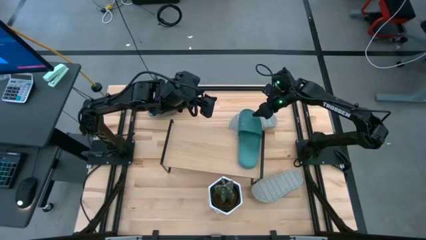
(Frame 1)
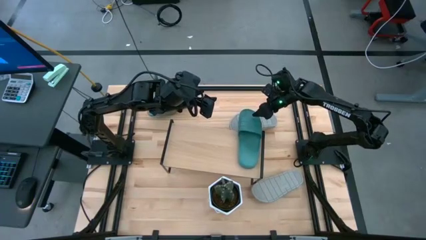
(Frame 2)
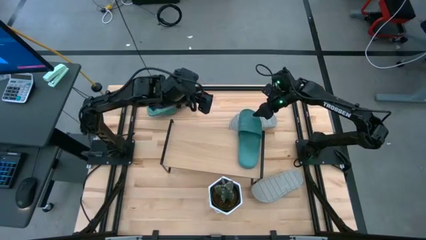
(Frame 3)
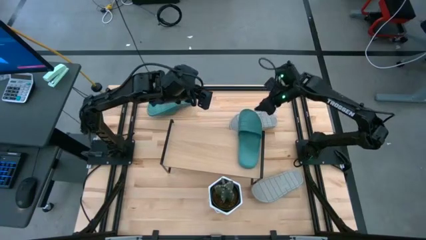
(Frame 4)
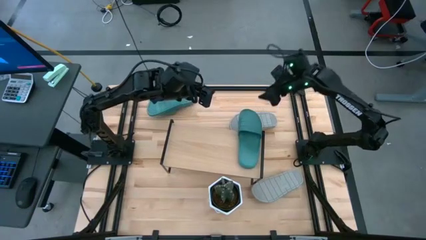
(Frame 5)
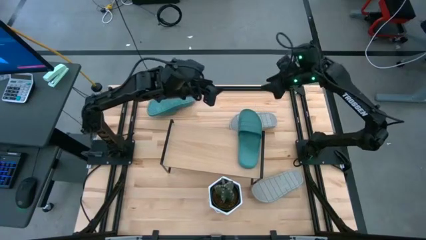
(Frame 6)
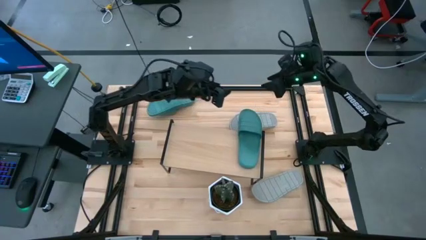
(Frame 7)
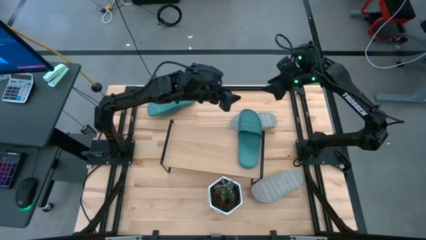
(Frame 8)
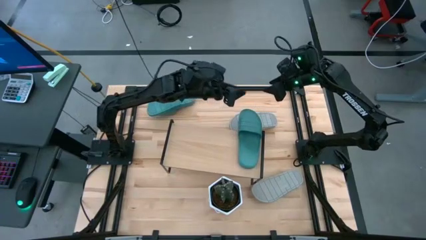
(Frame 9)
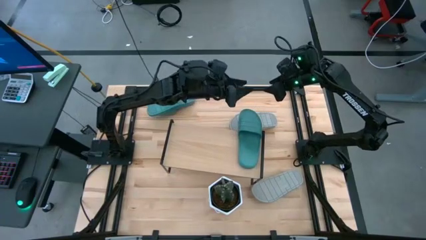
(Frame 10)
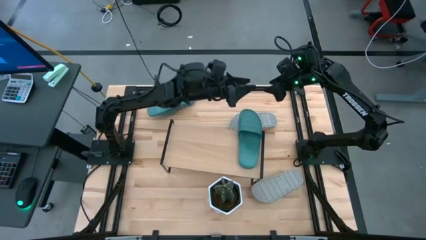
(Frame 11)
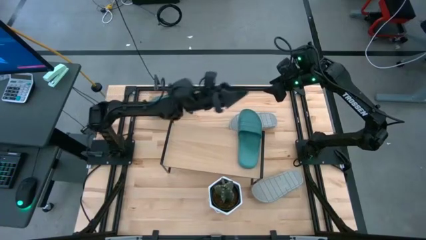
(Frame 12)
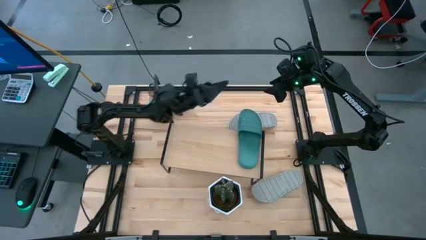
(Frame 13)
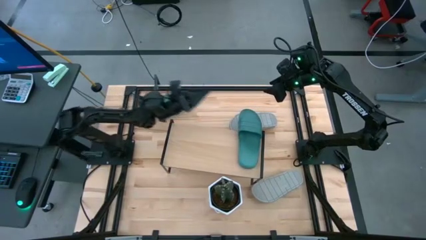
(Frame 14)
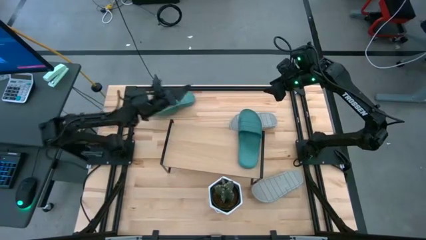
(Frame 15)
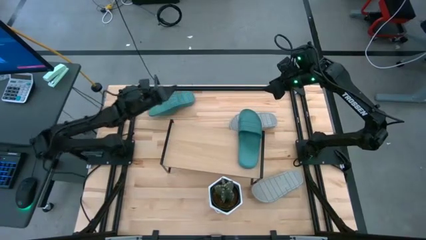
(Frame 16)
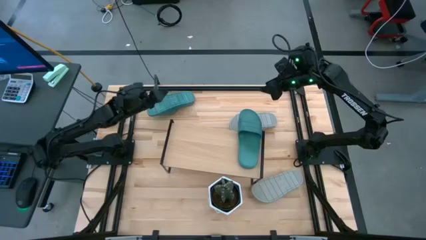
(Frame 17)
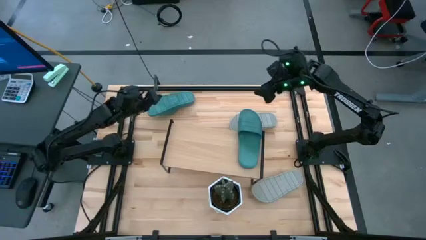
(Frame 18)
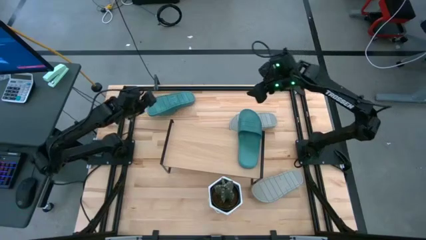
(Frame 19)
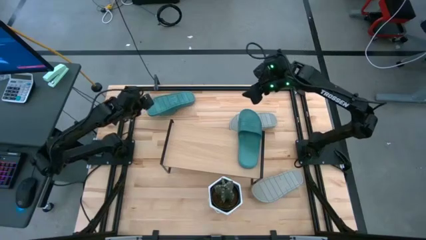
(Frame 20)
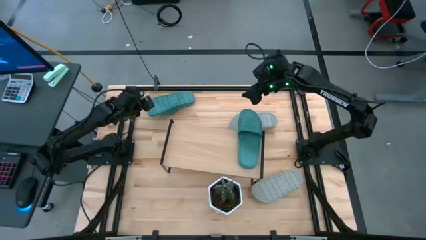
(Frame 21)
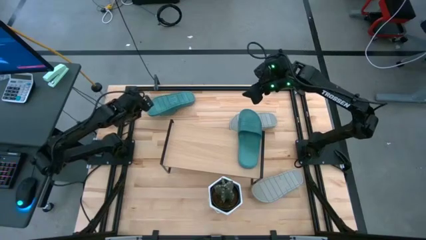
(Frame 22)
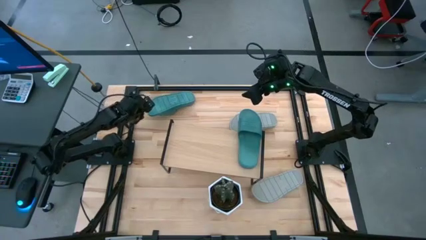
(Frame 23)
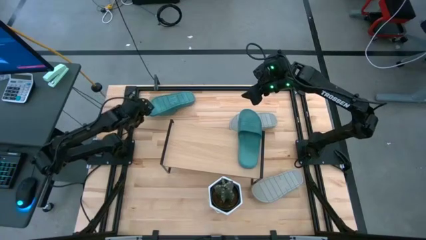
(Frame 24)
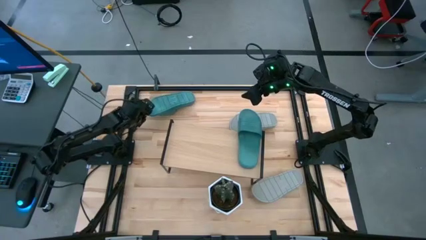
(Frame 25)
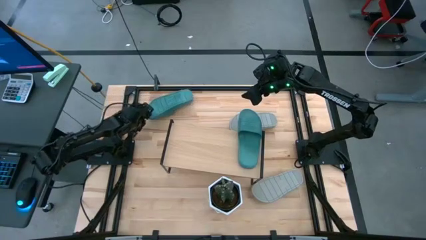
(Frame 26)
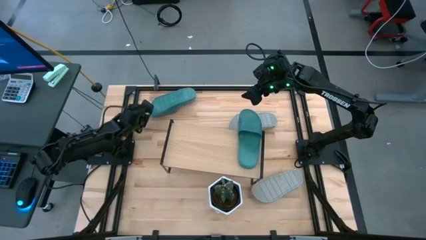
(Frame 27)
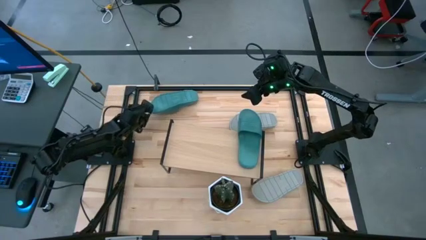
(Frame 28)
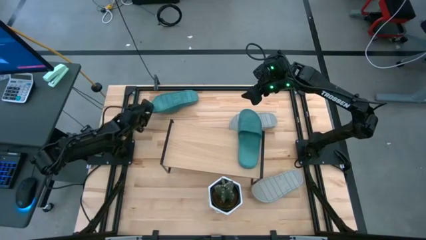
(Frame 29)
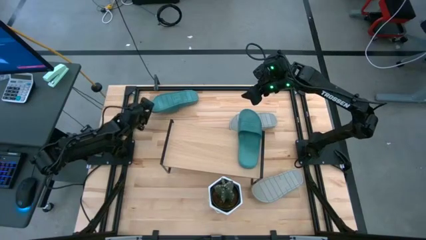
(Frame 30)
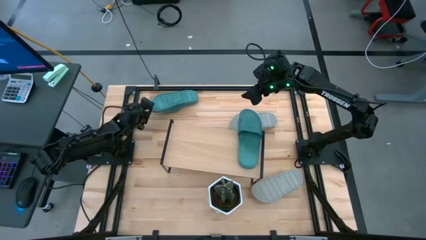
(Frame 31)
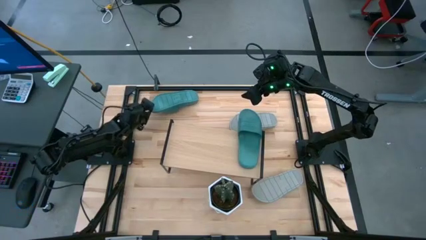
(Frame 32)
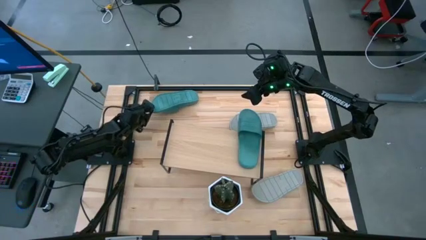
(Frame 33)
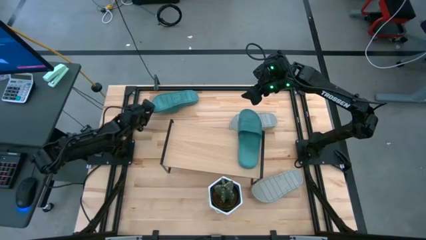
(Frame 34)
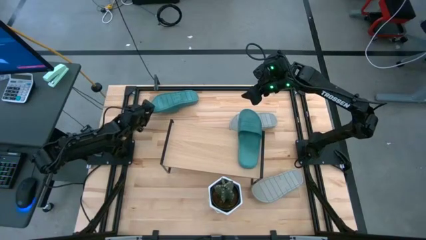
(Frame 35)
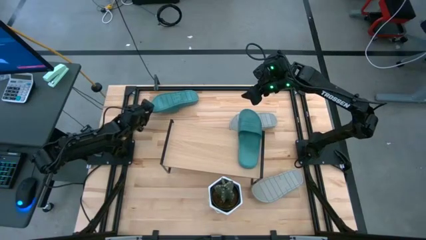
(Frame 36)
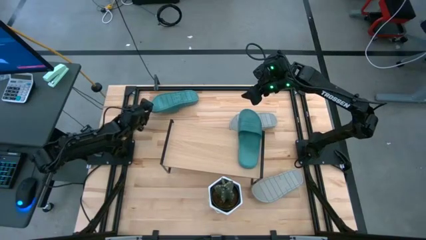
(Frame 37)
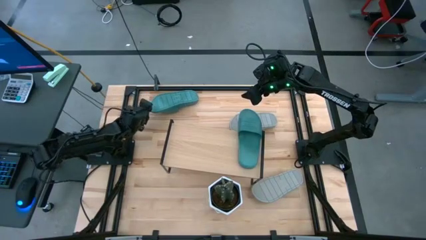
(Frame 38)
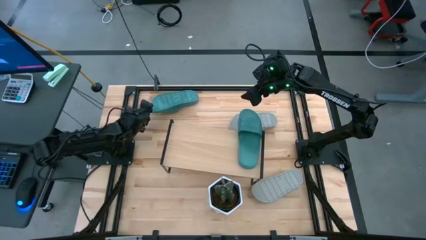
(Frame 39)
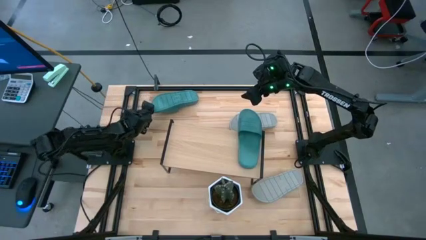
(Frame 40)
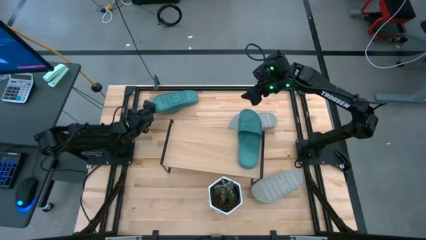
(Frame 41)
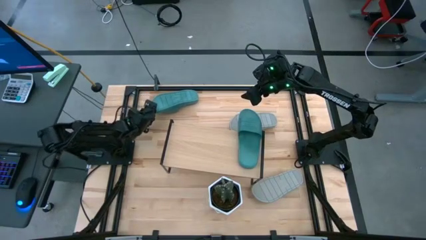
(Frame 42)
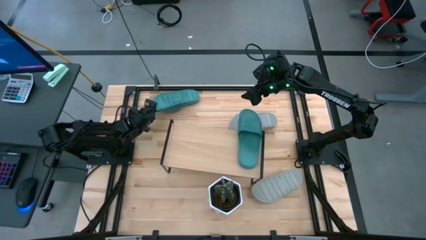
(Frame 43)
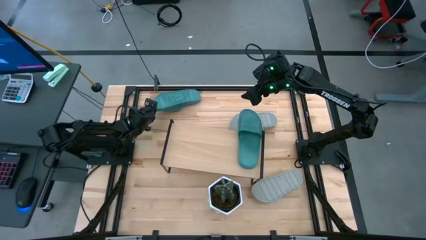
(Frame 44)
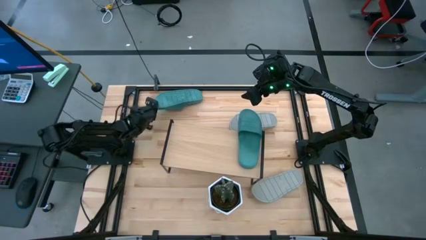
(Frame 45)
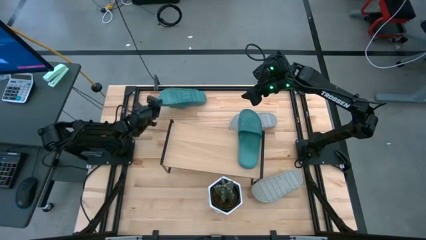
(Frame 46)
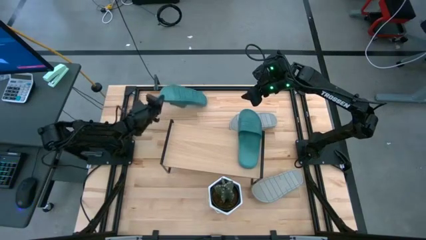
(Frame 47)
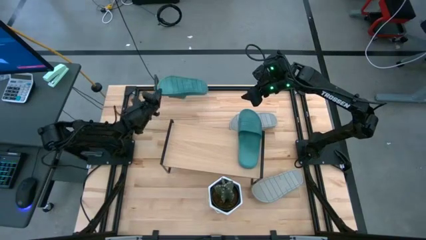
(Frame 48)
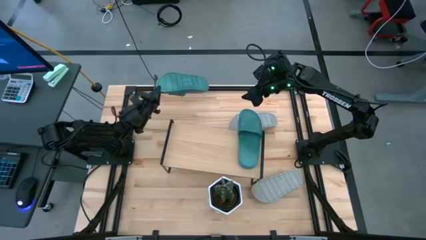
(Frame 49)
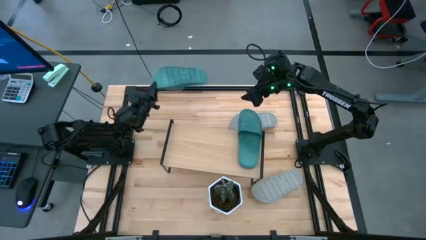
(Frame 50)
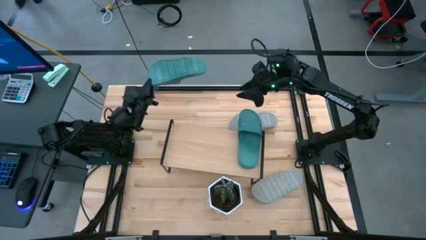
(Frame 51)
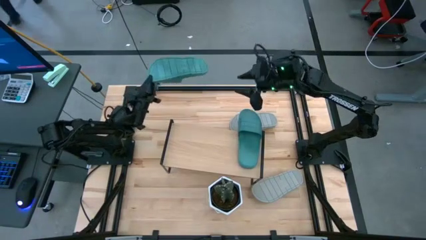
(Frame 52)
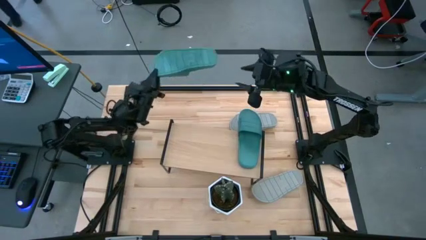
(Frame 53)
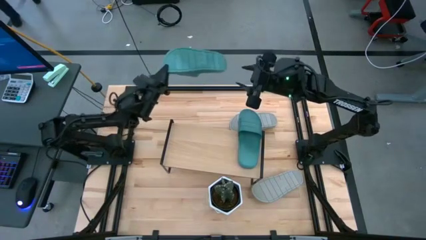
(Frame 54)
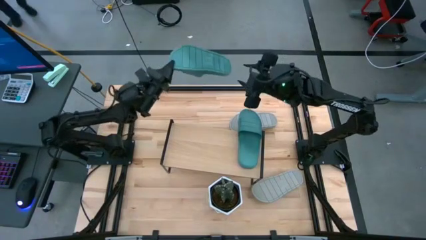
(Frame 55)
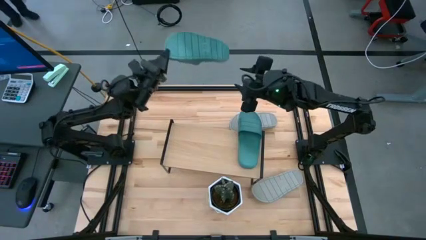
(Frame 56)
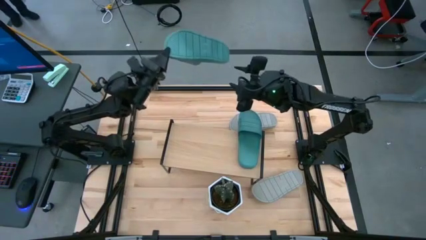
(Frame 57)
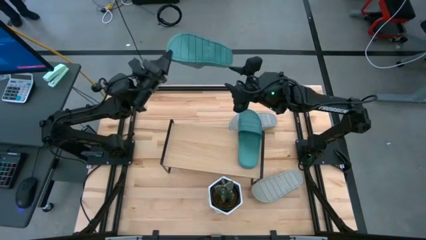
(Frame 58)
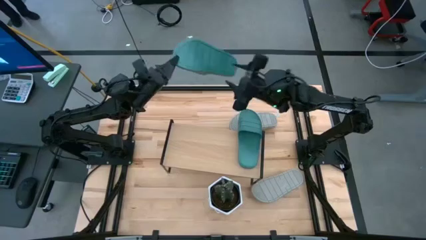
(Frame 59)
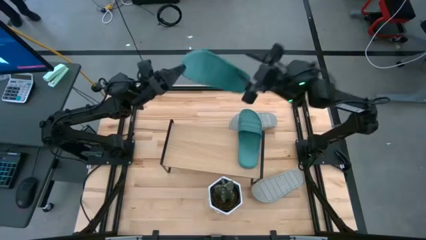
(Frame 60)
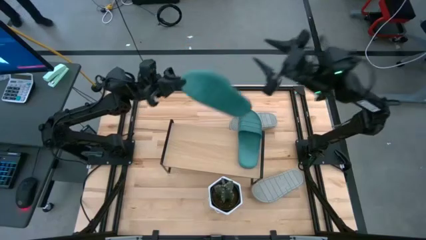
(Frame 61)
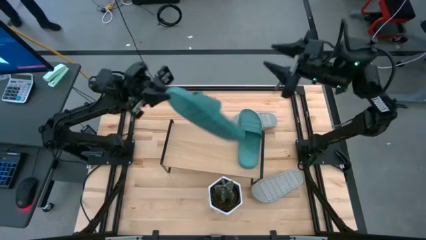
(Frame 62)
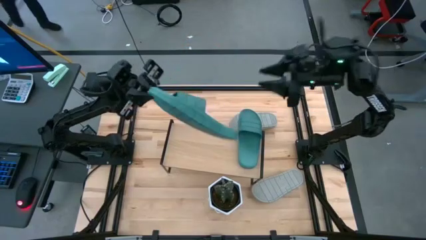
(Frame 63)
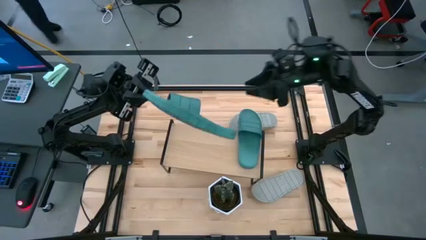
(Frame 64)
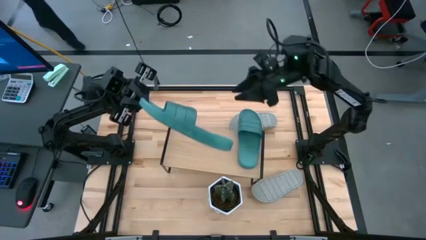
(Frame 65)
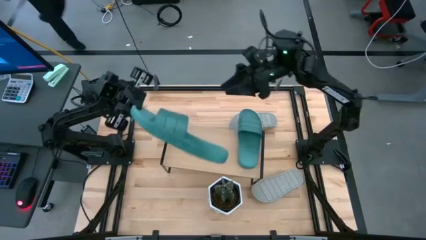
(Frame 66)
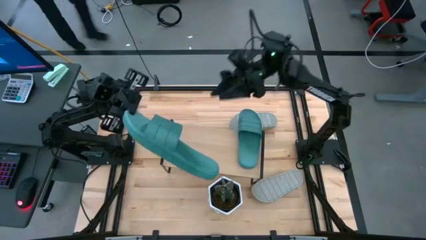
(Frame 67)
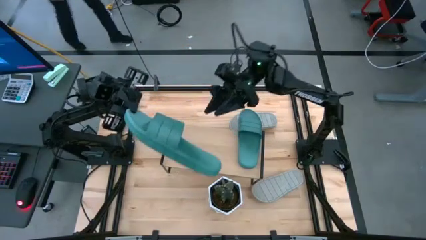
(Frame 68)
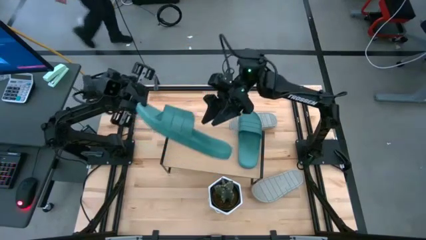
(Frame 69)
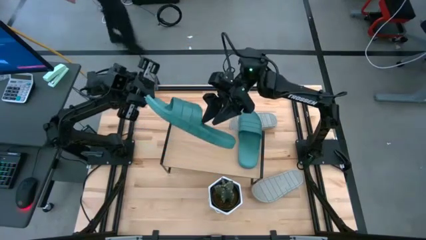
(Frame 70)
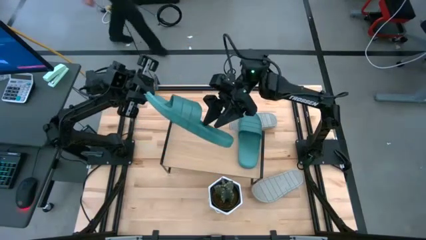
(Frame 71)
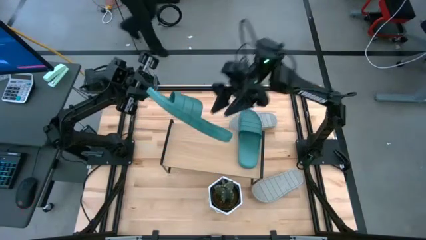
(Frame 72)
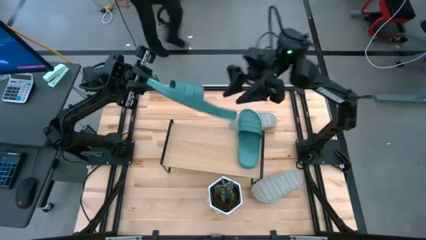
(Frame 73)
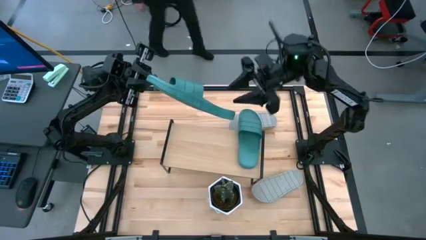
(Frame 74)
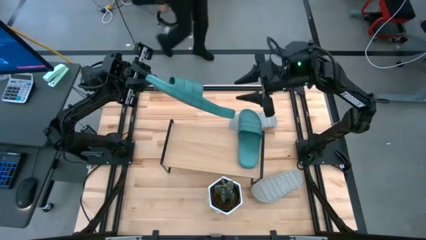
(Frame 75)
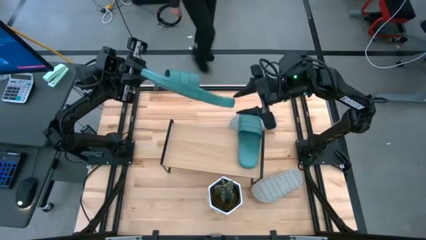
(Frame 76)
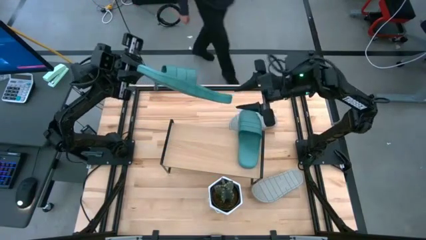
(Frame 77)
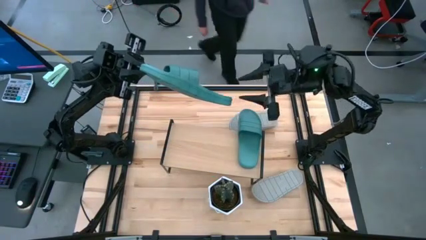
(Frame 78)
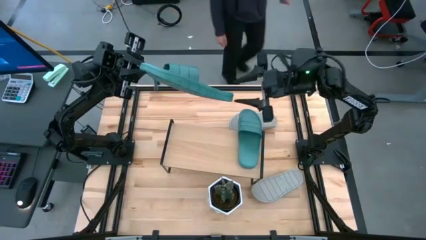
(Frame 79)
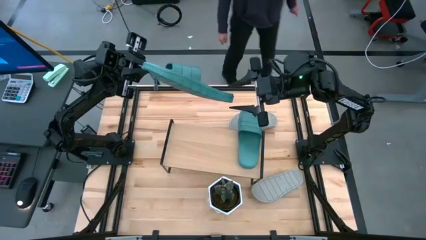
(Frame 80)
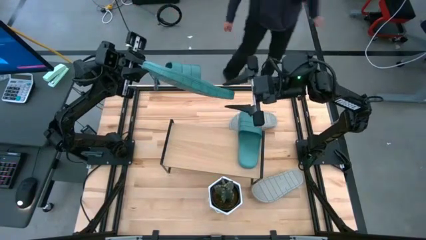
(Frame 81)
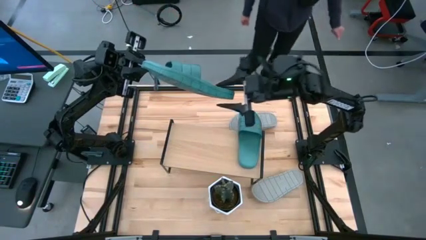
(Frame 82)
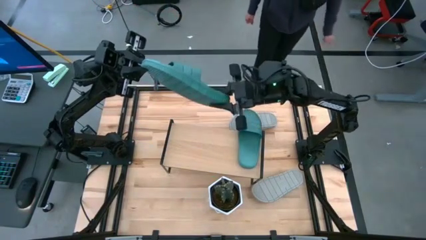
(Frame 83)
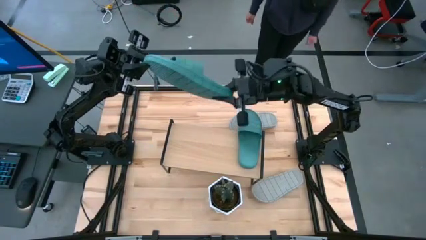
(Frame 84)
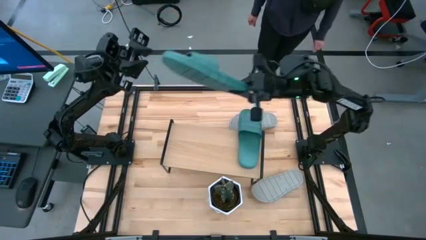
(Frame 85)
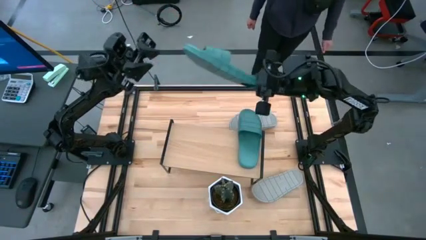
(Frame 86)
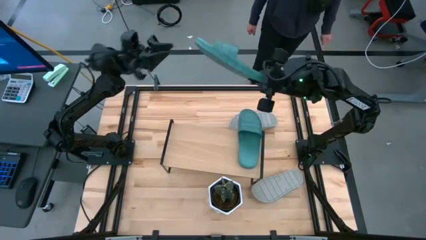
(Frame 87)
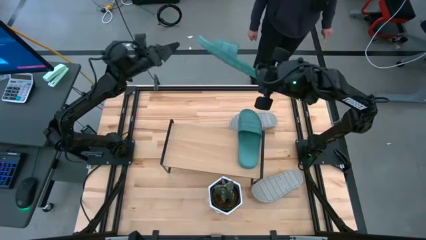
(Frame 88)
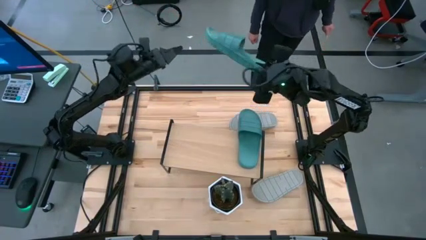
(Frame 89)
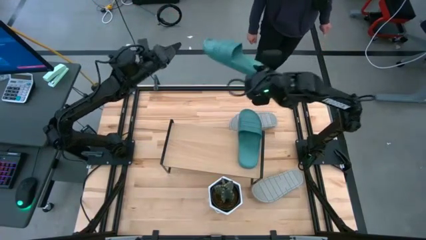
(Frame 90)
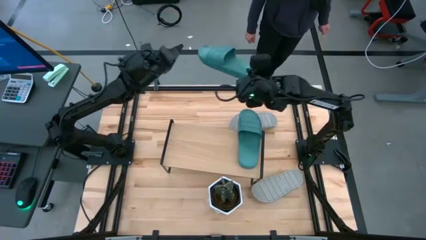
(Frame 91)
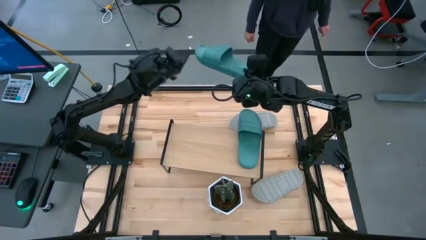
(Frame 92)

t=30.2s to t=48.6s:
Task: Pick and place slides into the shelf
Put the green slide on the shelf
